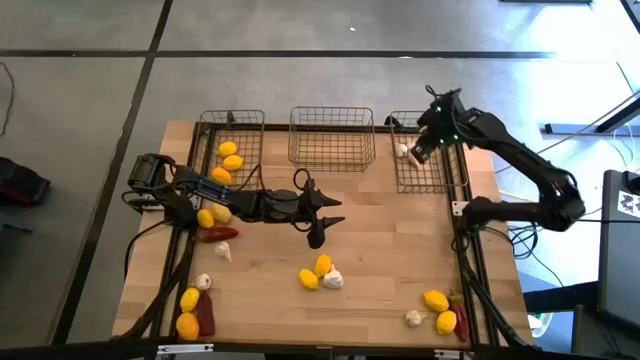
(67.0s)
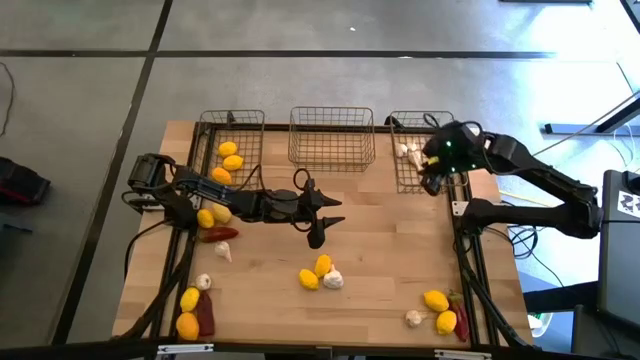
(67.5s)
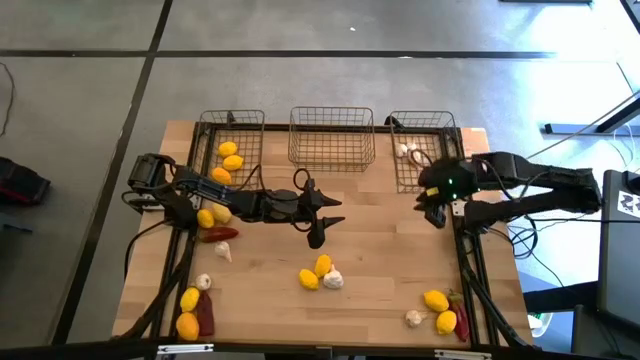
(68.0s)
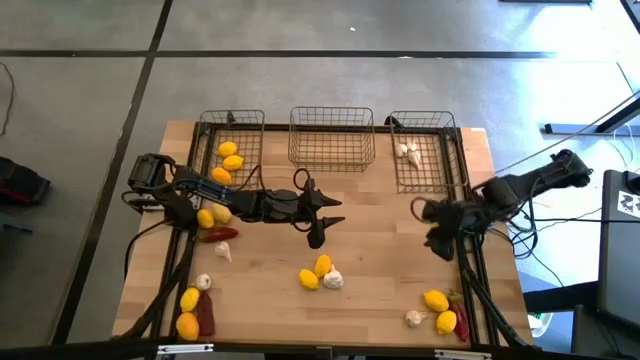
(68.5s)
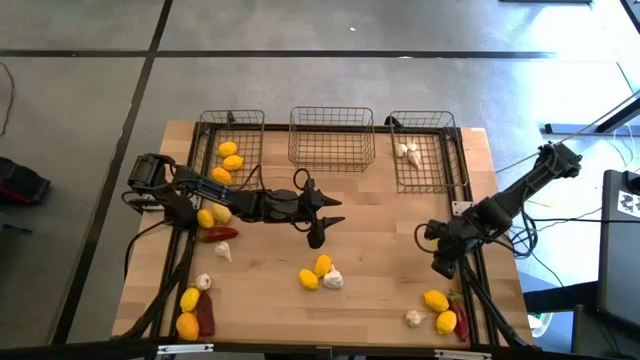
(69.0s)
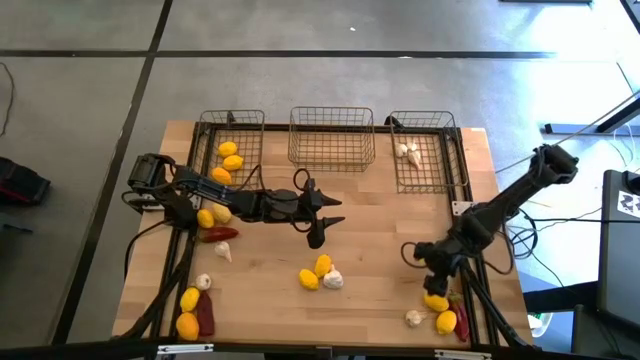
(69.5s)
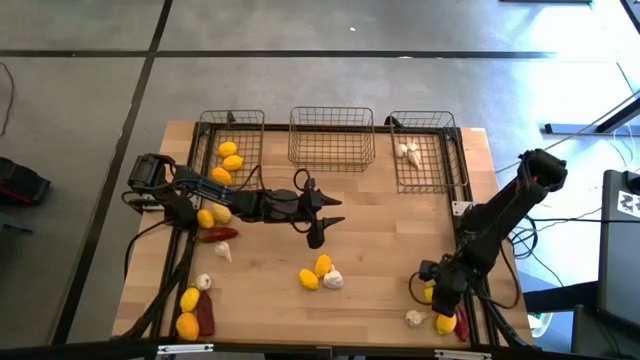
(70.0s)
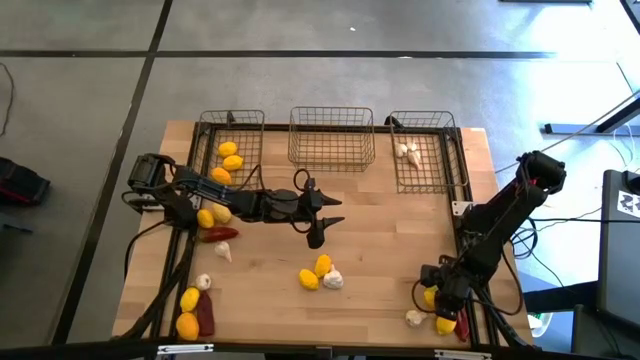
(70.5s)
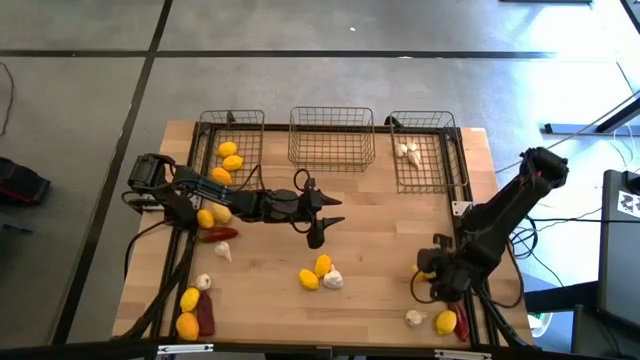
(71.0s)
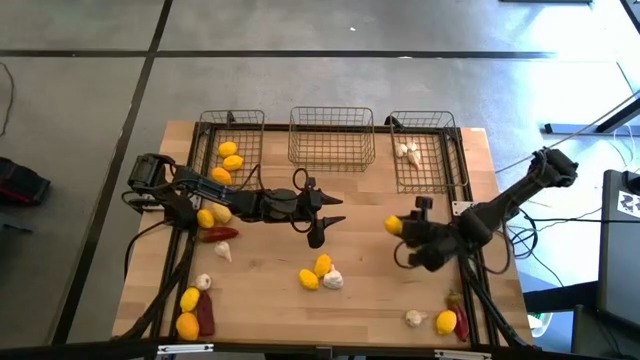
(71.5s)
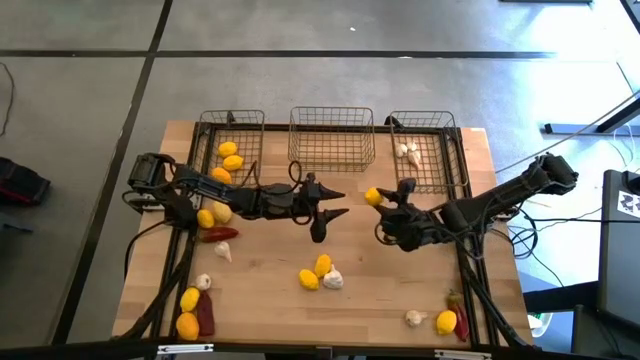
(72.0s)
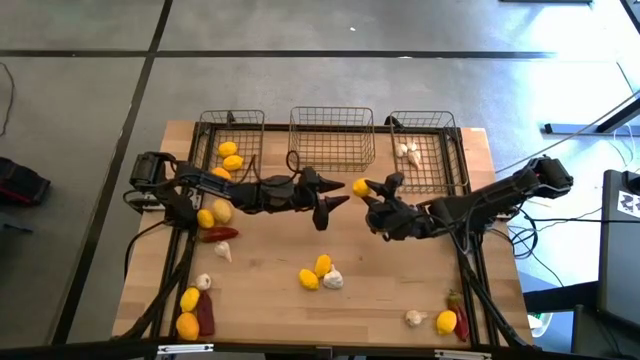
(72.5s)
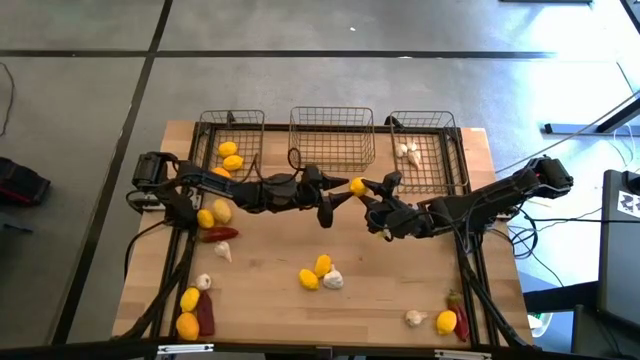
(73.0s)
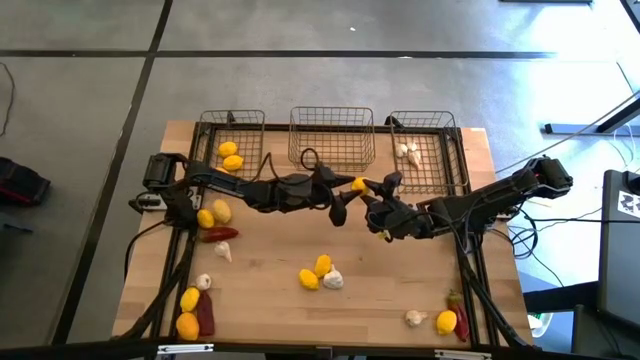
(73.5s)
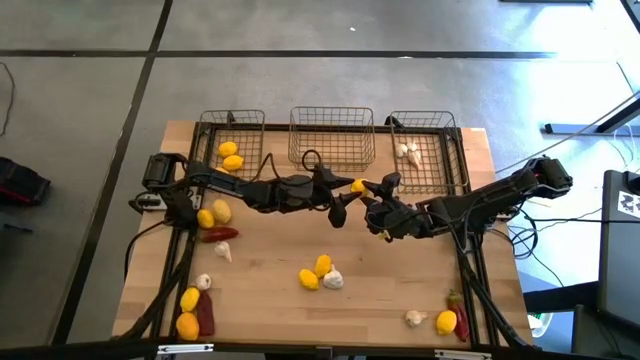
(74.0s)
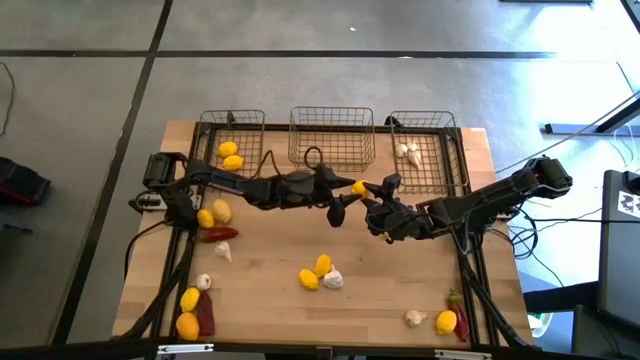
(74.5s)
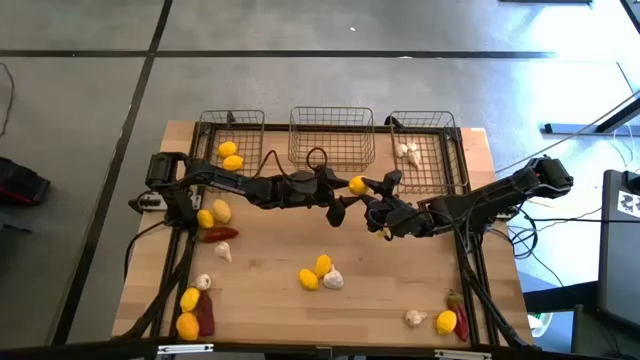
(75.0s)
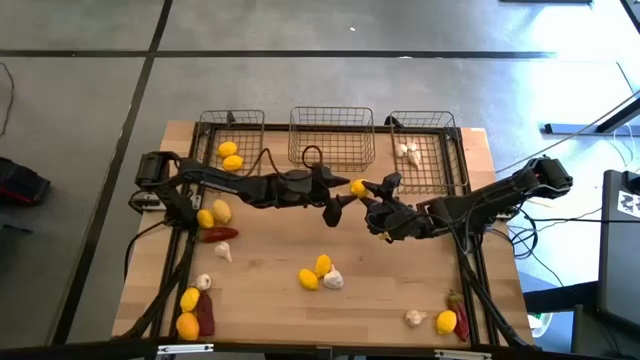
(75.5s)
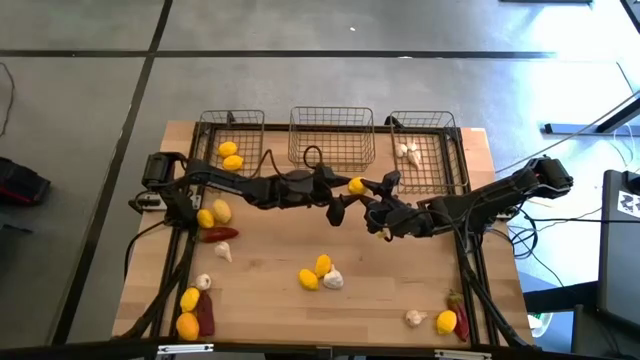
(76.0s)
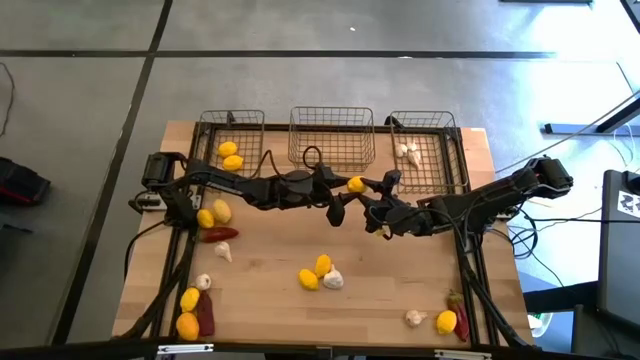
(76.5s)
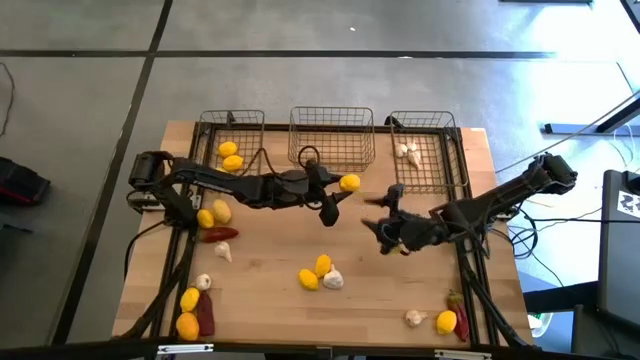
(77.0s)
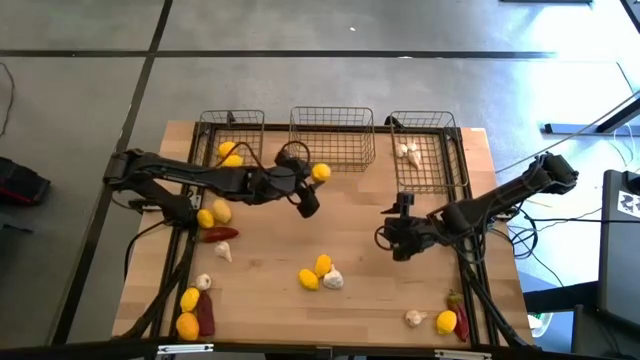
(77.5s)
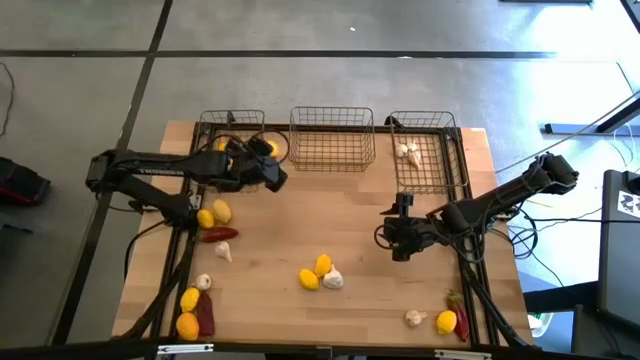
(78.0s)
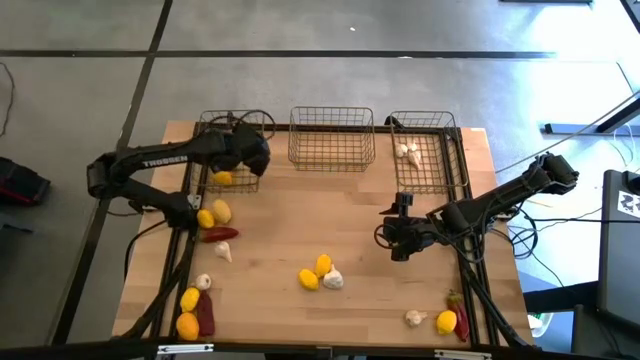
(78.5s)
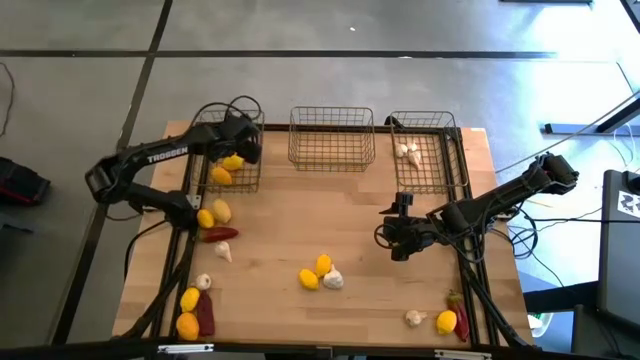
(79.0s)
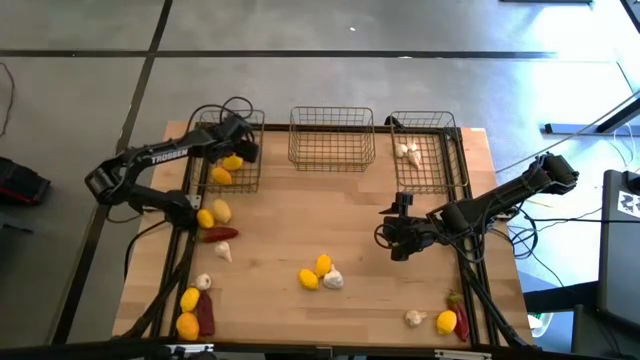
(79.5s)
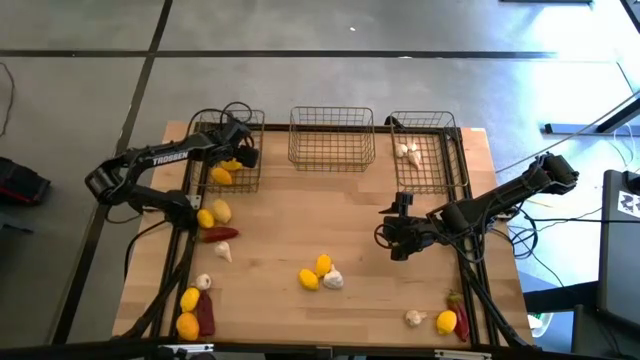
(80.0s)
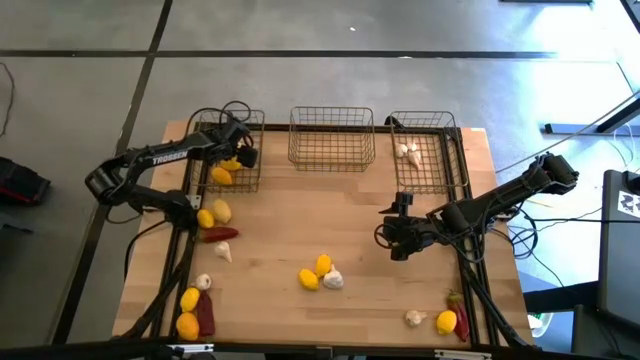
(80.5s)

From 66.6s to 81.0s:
Task: Sort produce into baskets
Put the yellow lemon into the left gold wire basket

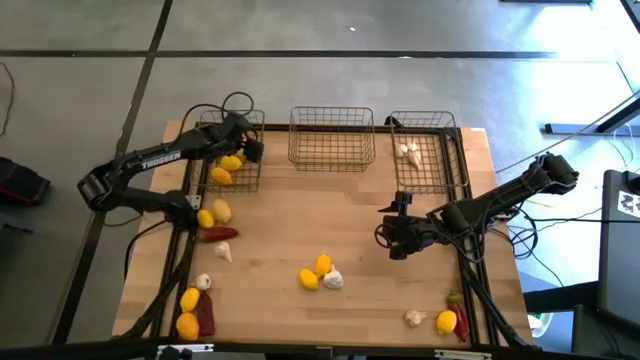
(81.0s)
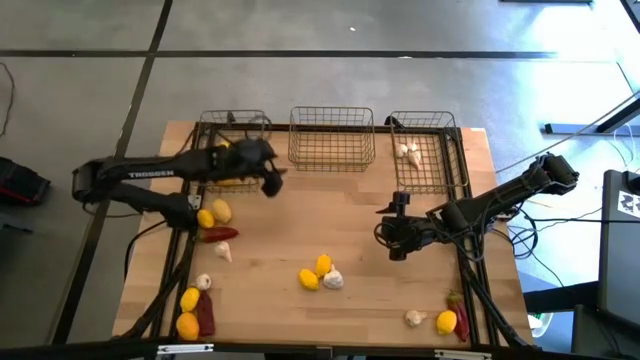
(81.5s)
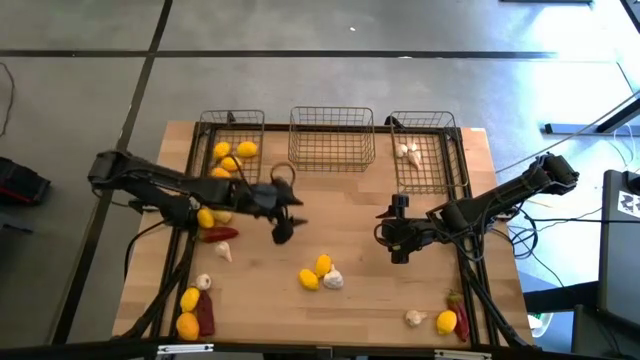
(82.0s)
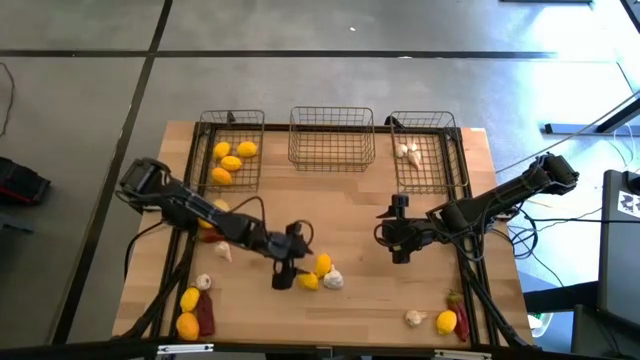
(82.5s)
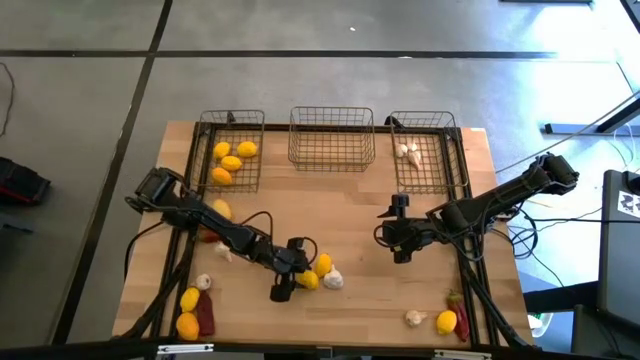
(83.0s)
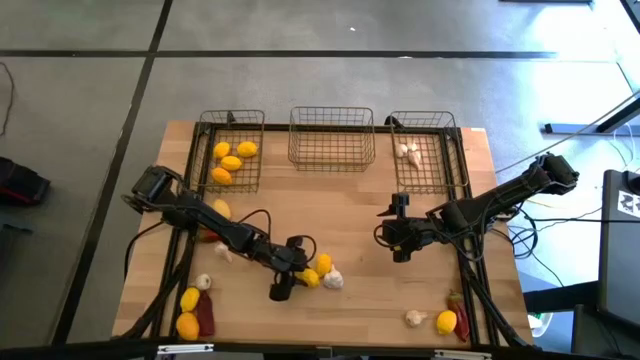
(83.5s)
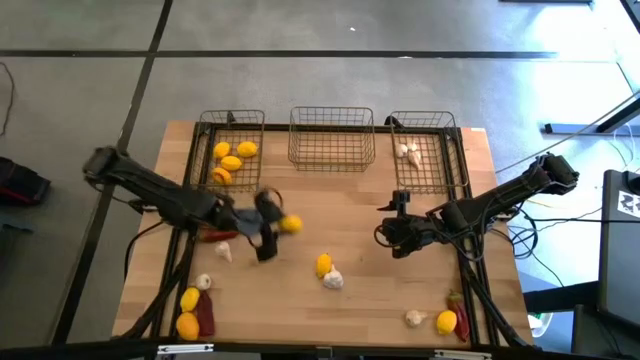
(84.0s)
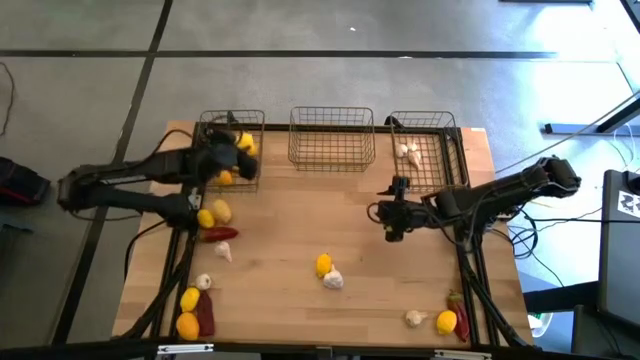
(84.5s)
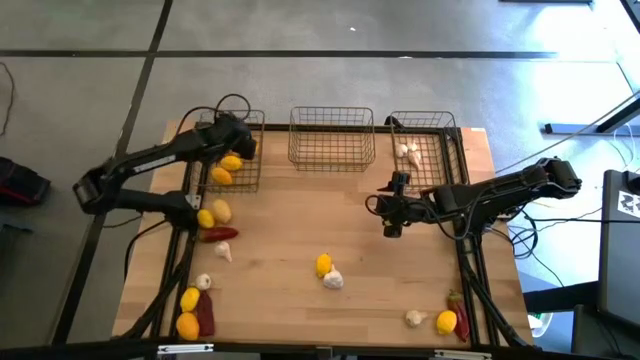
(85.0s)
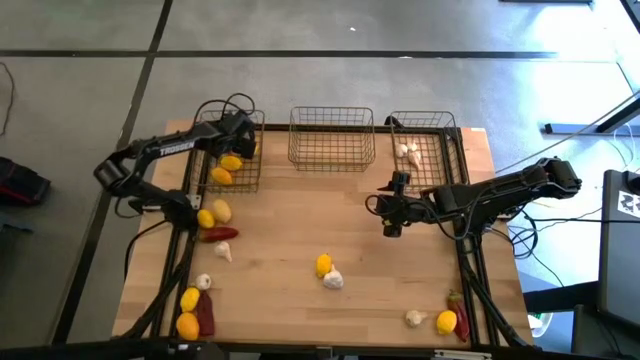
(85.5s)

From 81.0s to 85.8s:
Put the yellow lemon into the left gold wire basket
